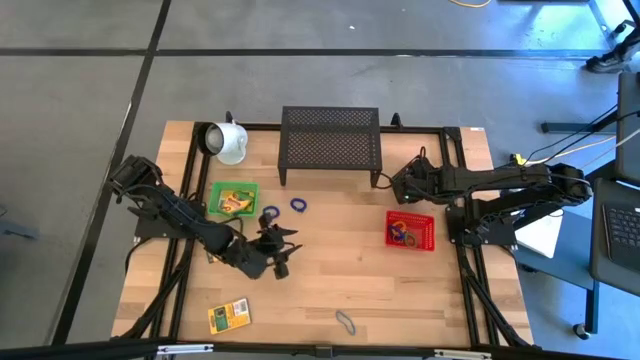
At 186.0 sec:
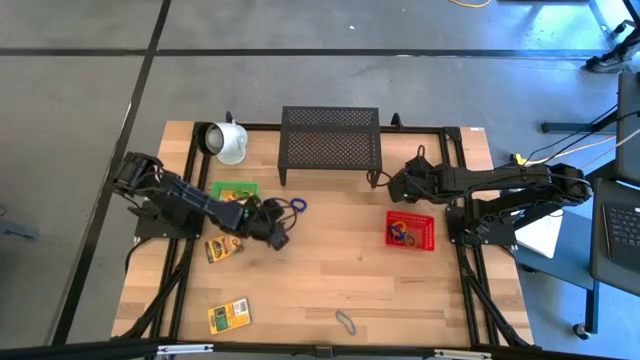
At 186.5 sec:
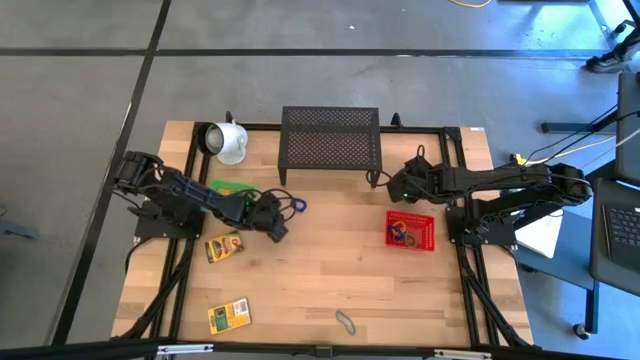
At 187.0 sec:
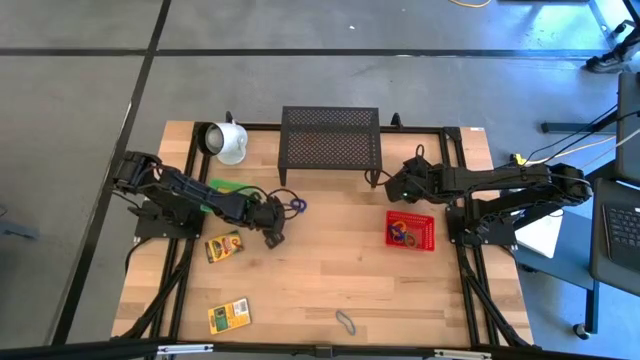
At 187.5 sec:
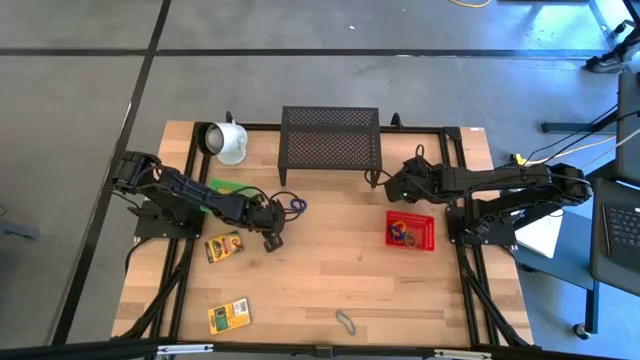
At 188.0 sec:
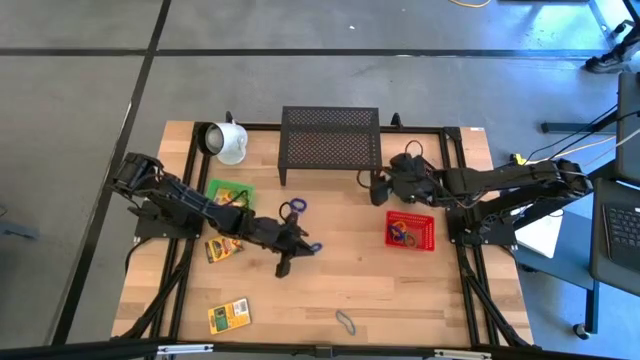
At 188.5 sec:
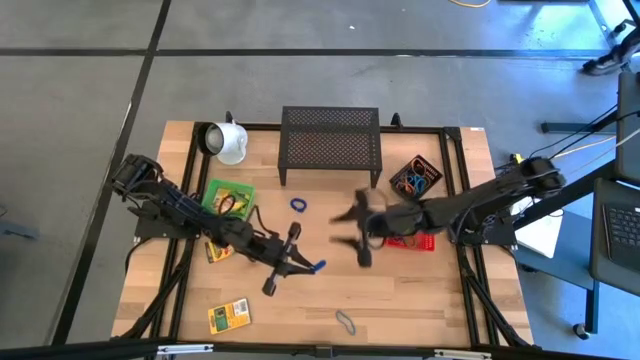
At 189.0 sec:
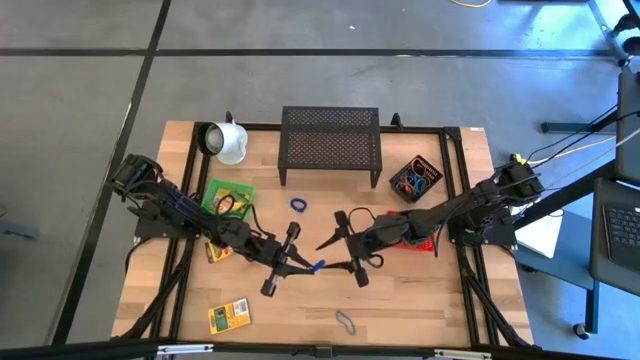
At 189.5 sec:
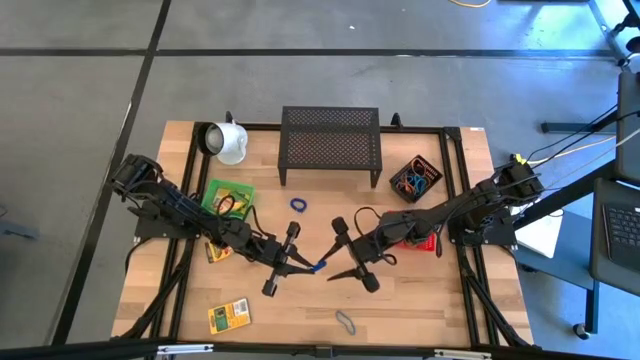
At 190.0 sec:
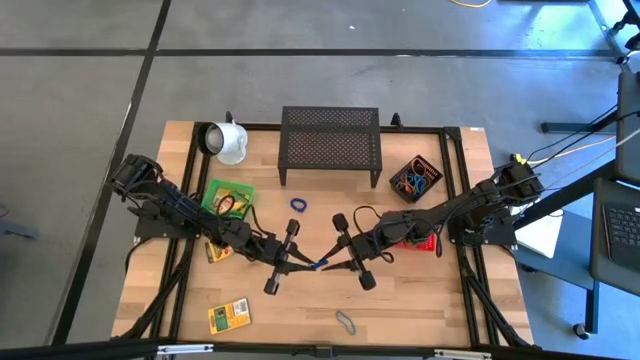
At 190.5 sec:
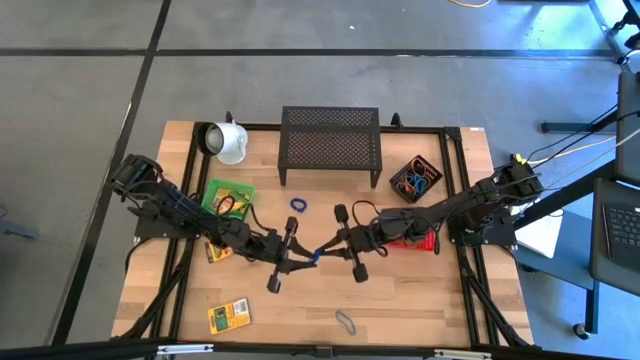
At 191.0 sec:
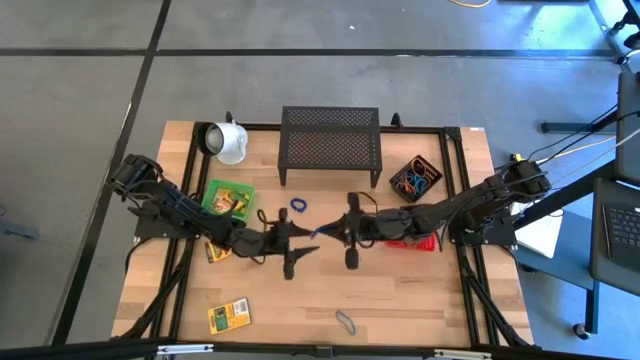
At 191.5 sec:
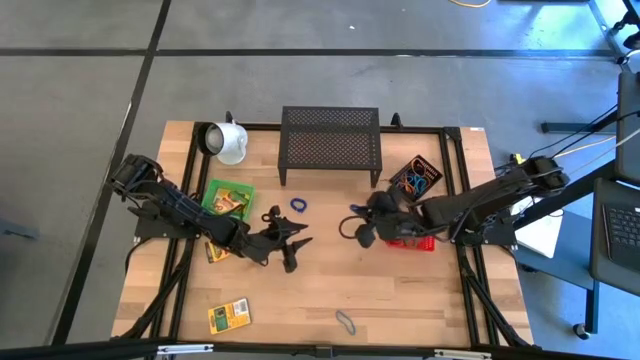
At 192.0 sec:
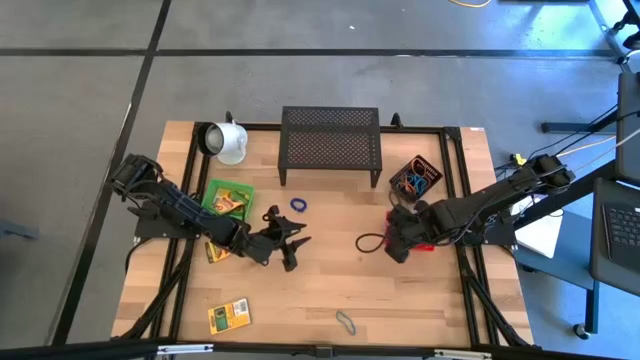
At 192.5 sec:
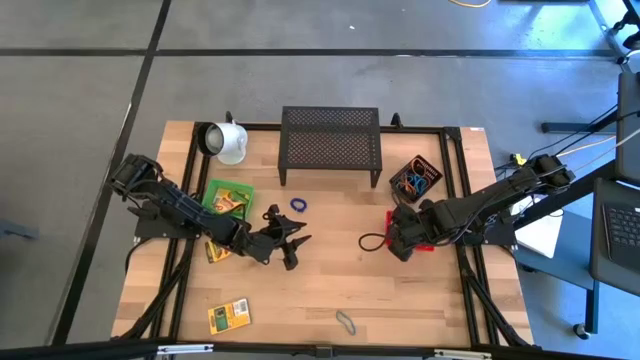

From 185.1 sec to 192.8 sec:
Task: Pick & Place Office Desk Supplies
Put the blue spring keychain into the orange bin

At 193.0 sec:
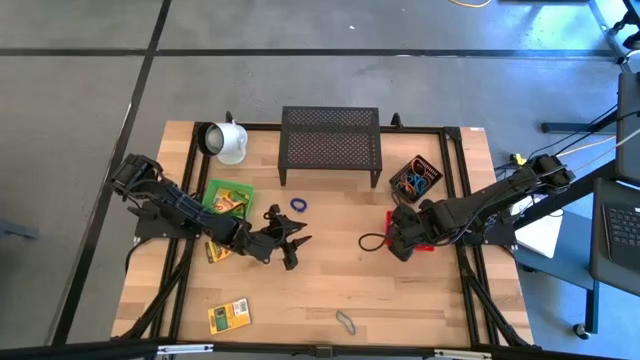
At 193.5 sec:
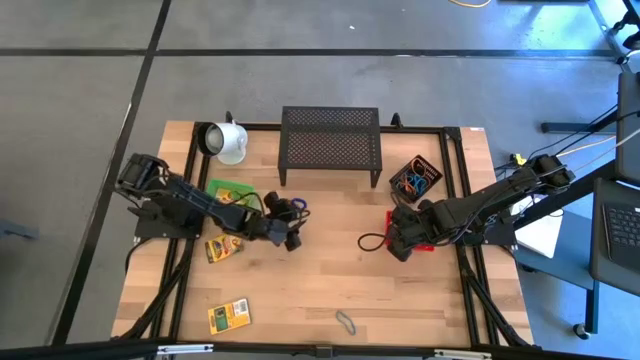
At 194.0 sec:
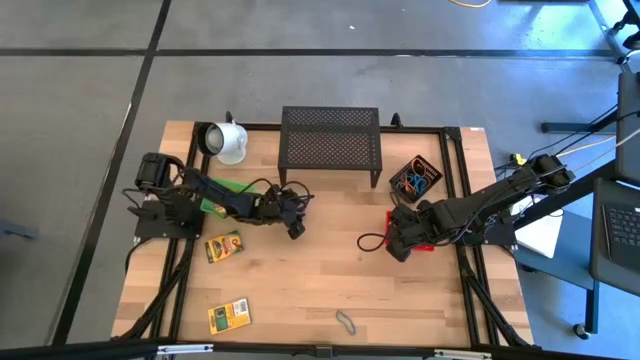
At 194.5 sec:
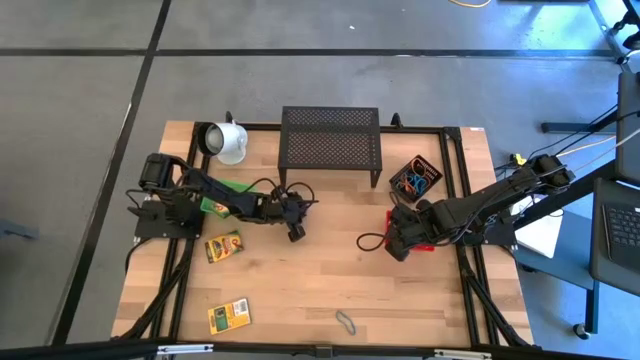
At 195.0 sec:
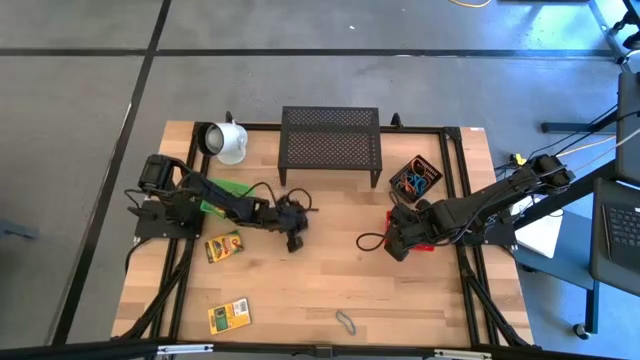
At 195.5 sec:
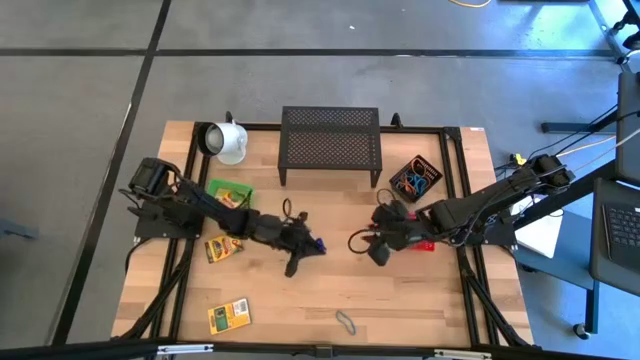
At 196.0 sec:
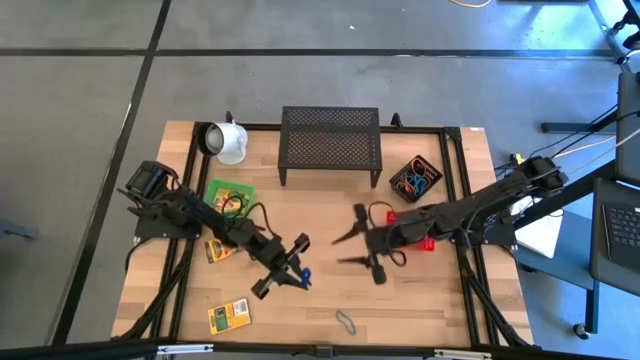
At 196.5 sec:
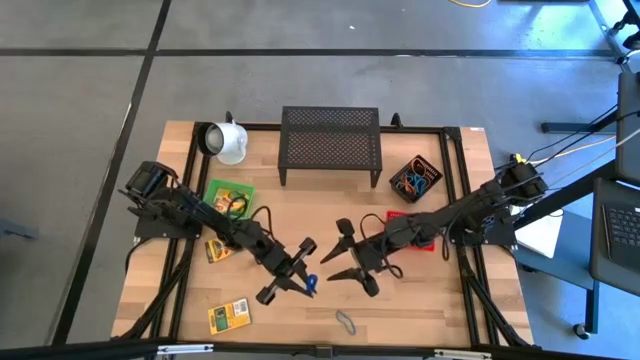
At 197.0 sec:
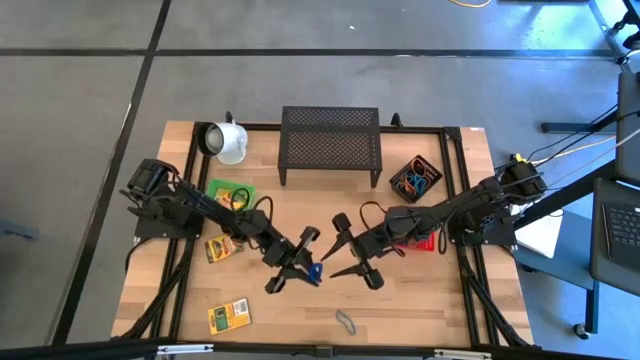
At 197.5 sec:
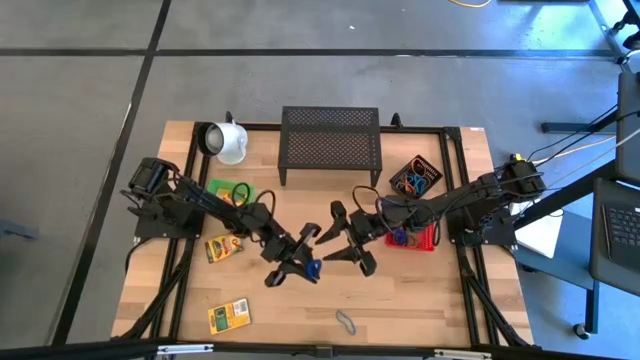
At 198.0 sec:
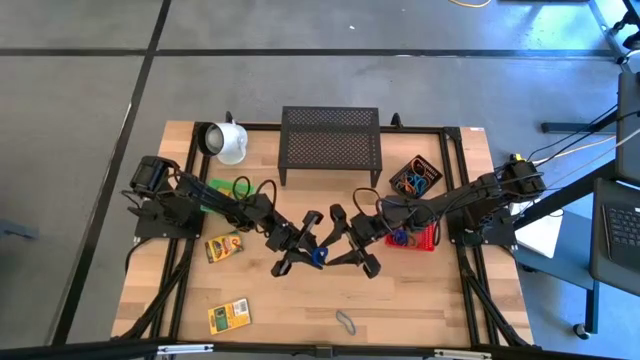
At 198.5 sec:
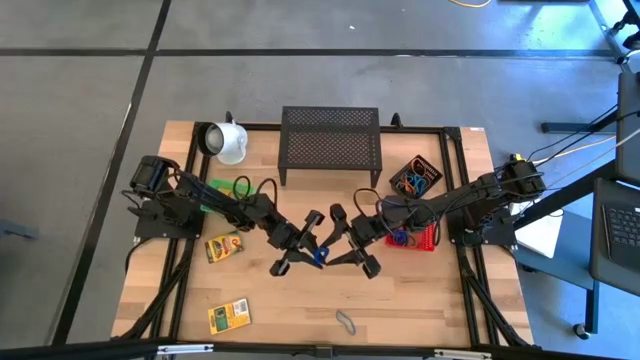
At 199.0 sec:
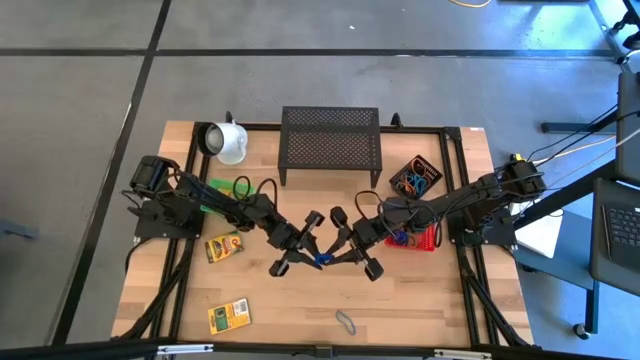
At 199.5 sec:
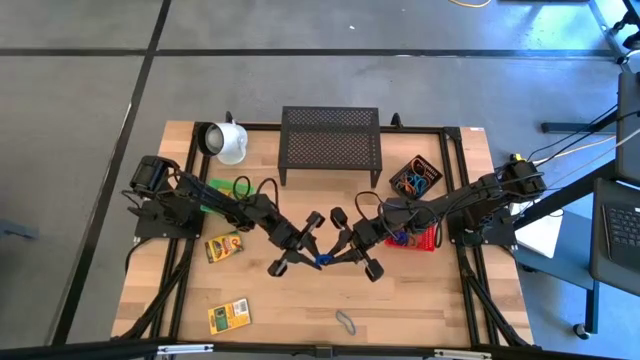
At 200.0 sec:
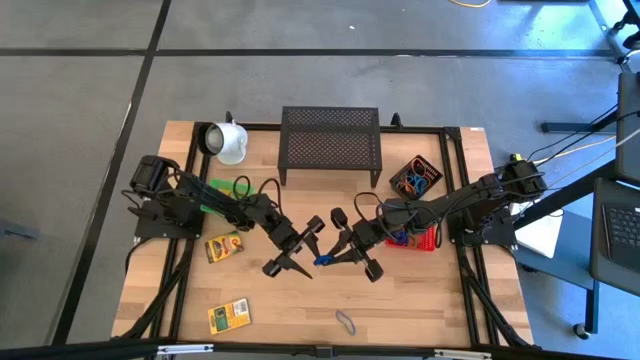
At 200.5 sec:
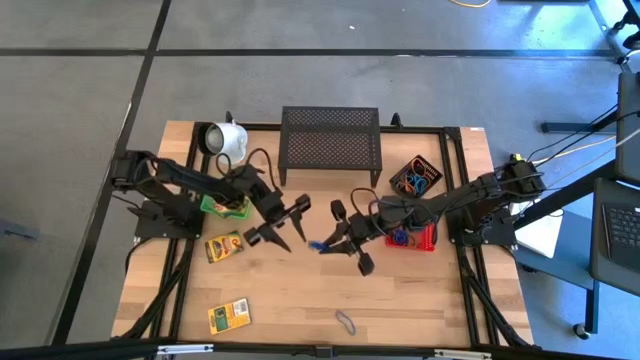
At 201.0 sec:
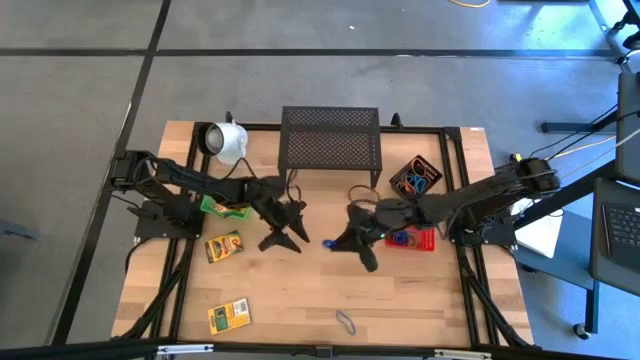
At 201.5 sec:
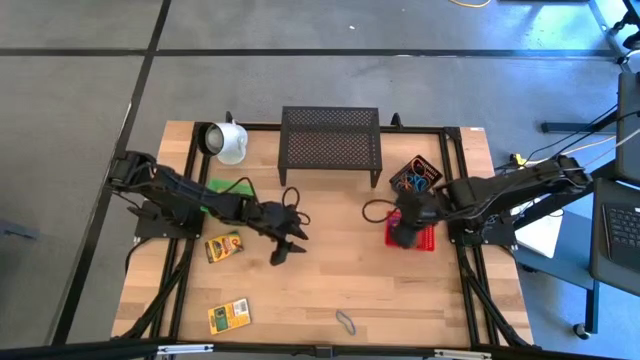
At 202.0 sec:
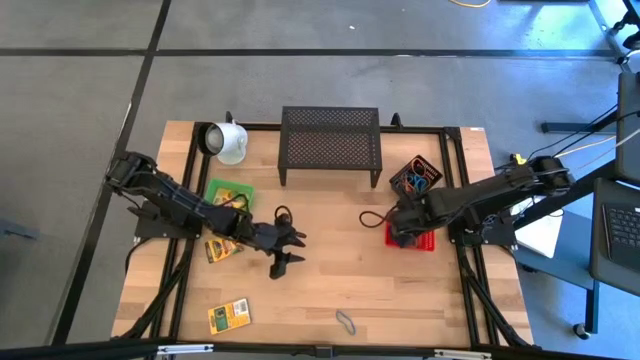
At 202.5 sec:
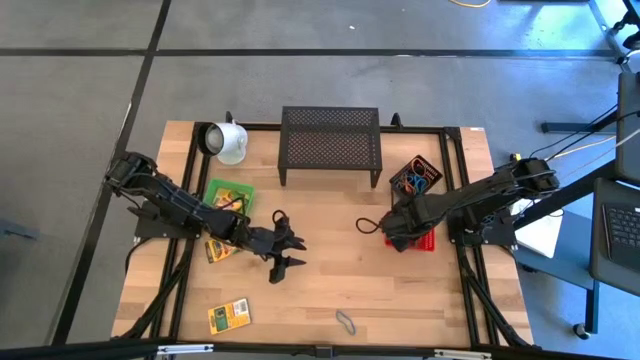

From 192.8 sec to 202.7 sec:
Put the blue spring rubber keychain into the orange bin

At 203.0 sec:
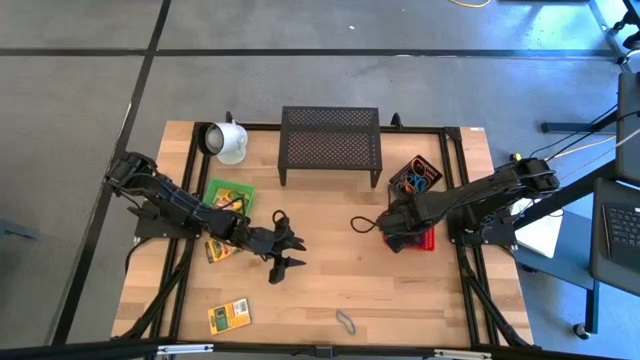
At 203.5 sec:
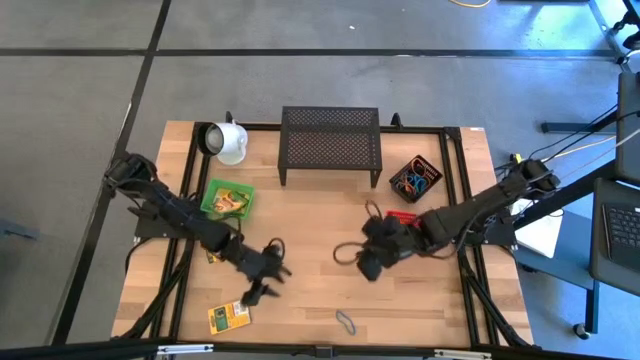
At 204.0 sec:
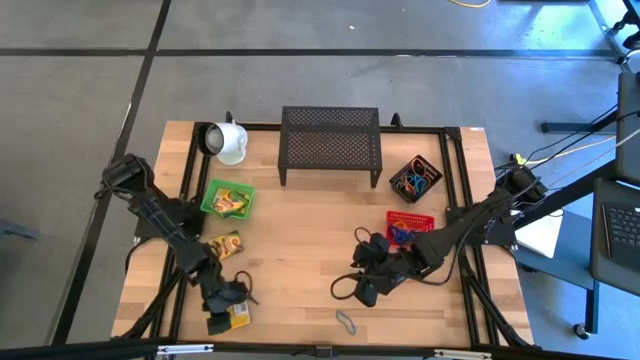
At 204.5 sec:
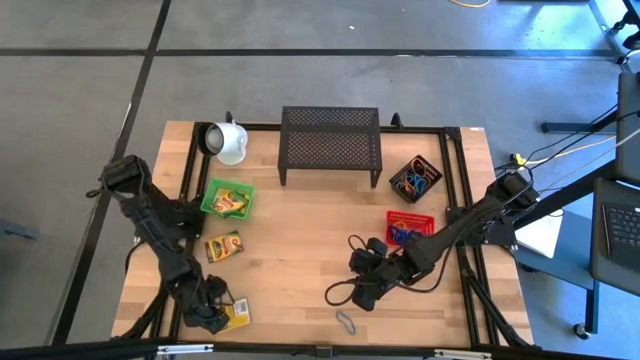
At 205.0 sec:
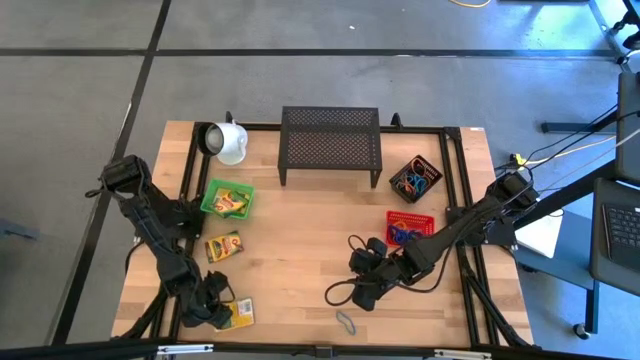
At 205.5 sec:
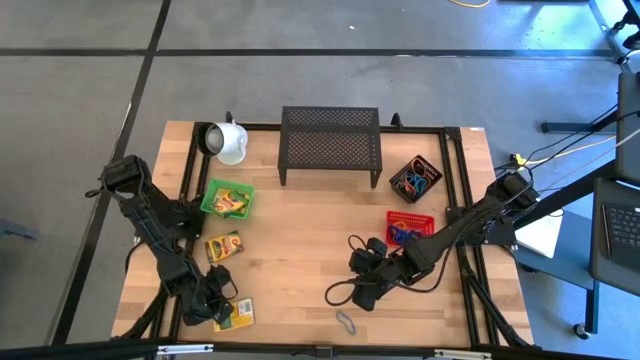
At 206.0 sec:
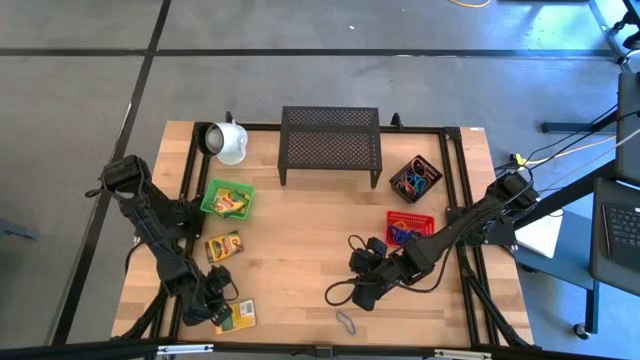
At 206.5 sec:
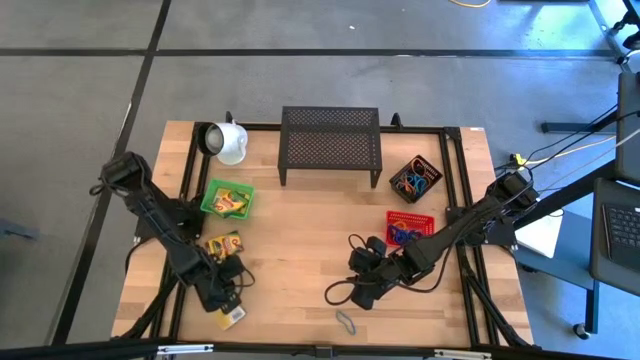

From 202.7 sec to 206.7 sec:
Put the pack of crayons into the green bin
